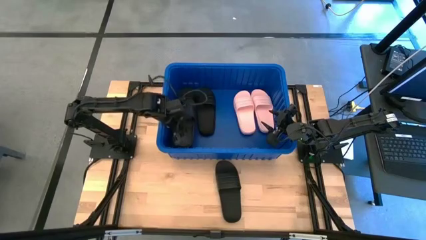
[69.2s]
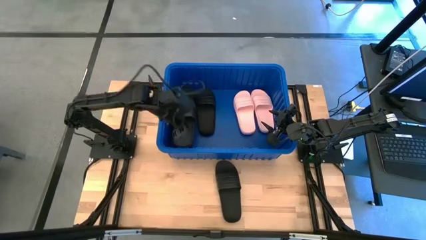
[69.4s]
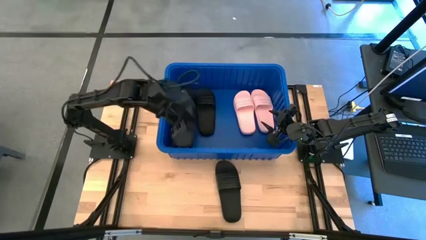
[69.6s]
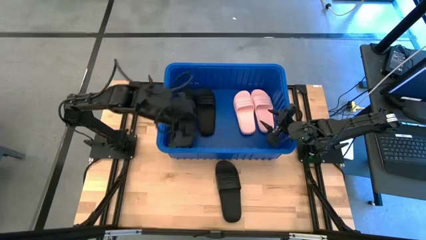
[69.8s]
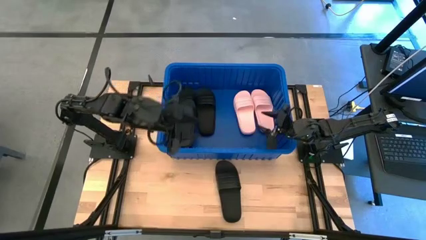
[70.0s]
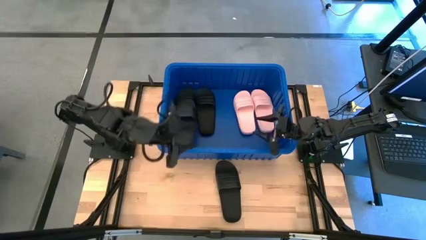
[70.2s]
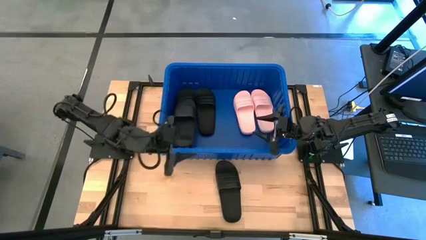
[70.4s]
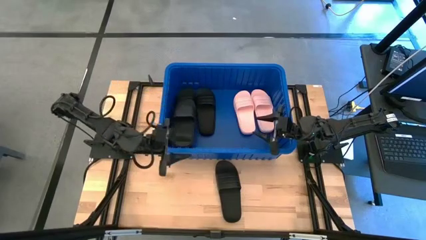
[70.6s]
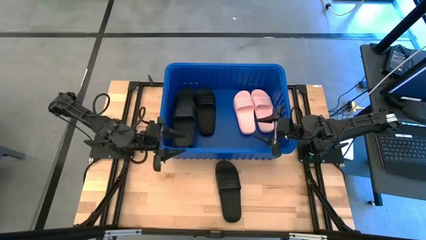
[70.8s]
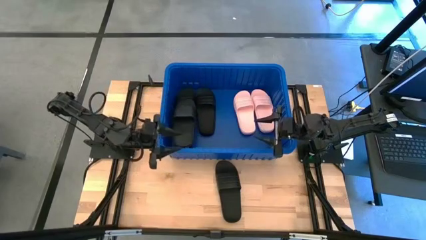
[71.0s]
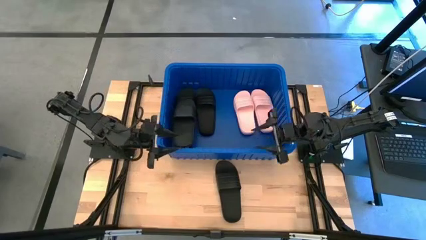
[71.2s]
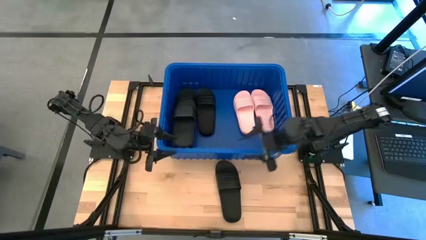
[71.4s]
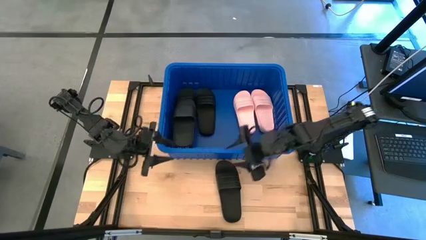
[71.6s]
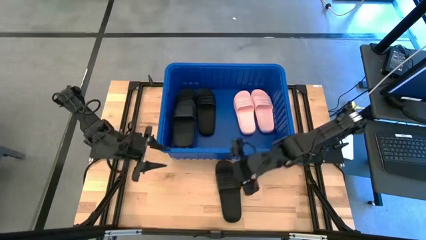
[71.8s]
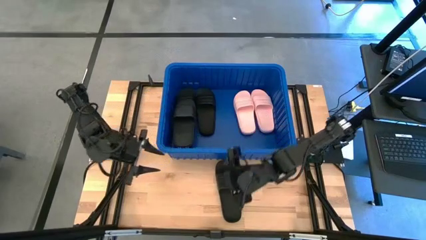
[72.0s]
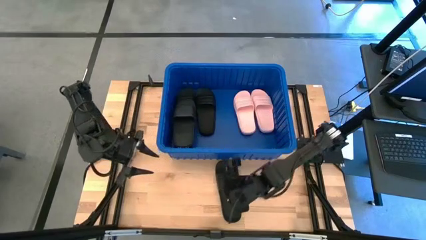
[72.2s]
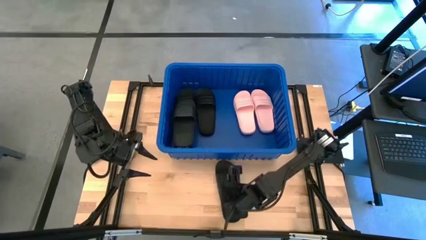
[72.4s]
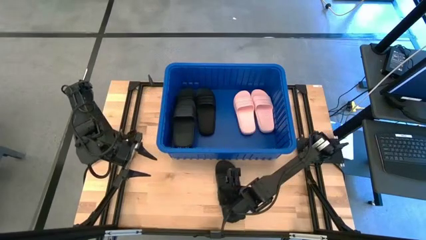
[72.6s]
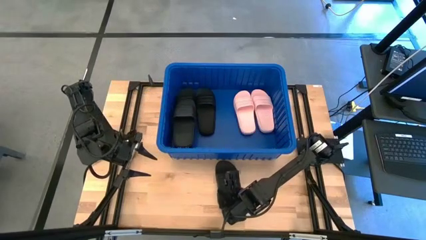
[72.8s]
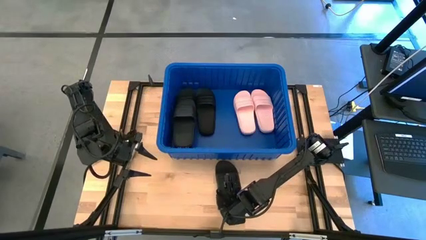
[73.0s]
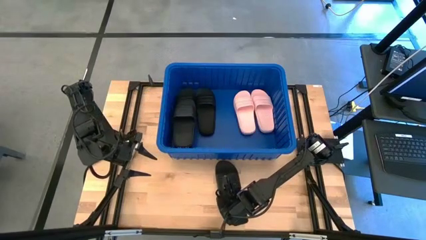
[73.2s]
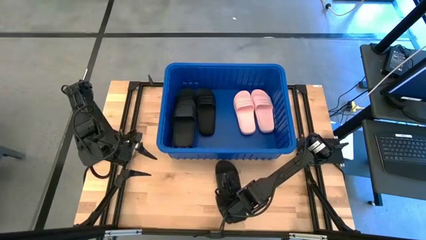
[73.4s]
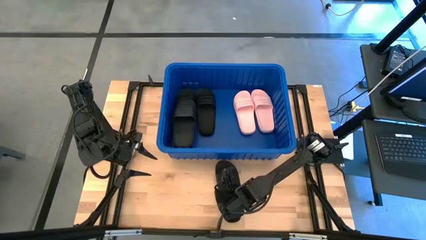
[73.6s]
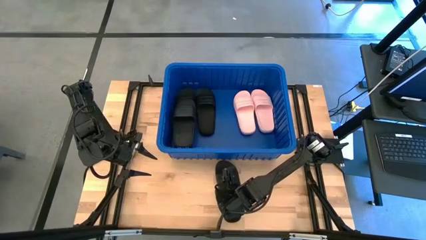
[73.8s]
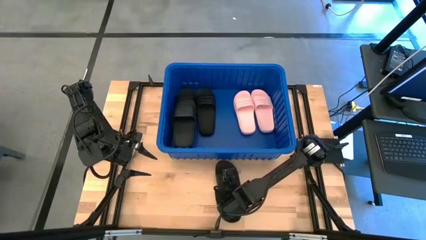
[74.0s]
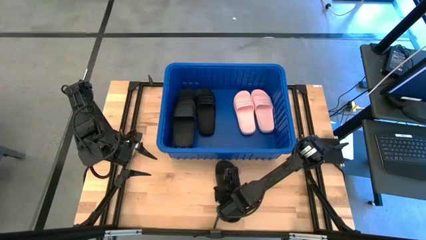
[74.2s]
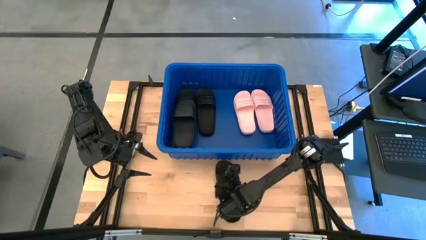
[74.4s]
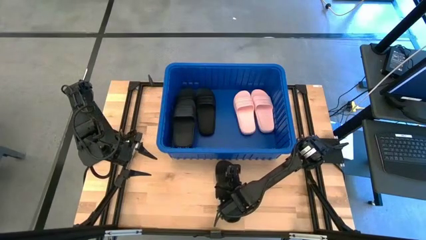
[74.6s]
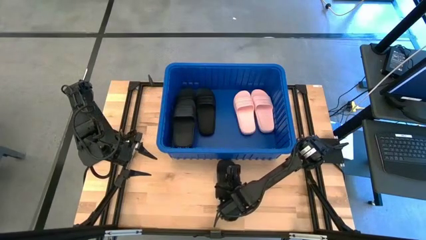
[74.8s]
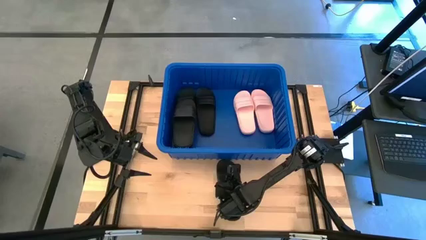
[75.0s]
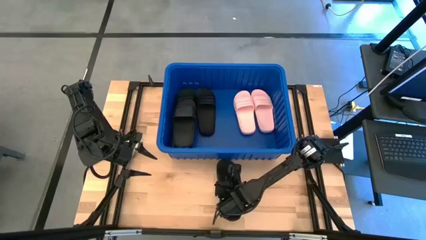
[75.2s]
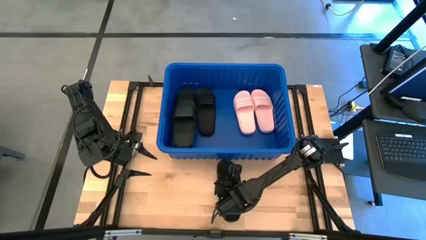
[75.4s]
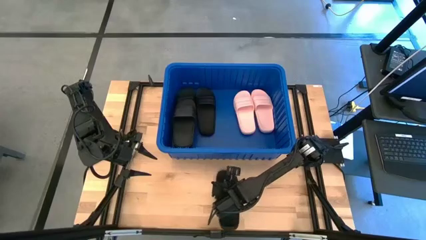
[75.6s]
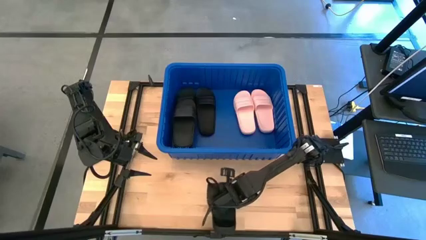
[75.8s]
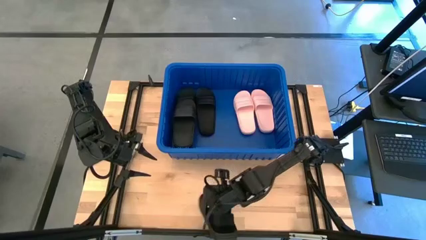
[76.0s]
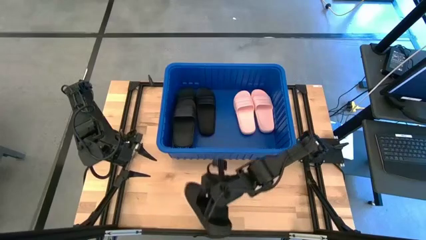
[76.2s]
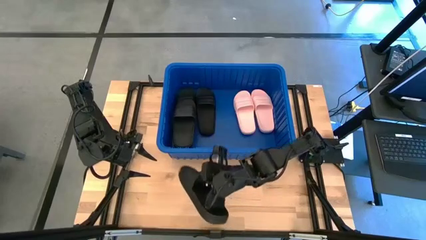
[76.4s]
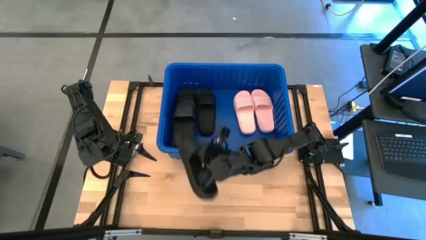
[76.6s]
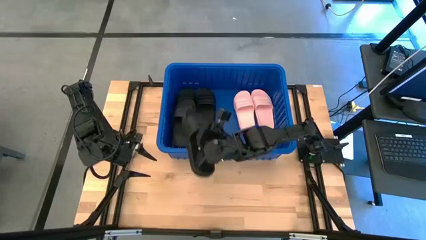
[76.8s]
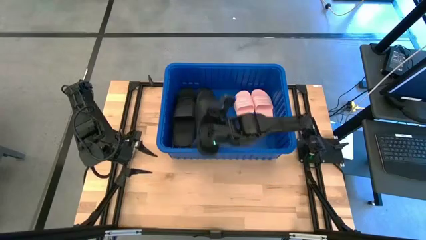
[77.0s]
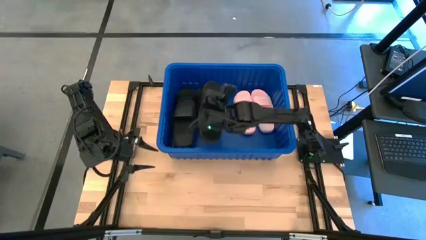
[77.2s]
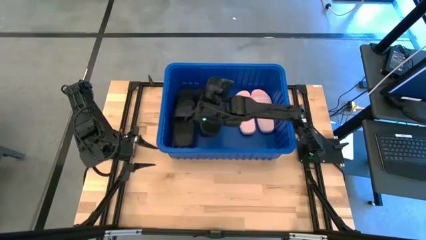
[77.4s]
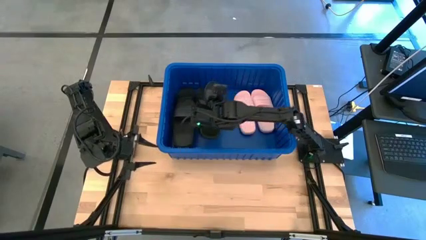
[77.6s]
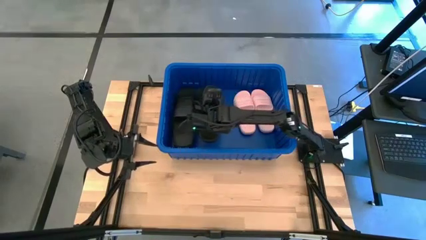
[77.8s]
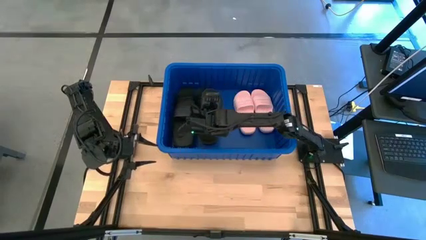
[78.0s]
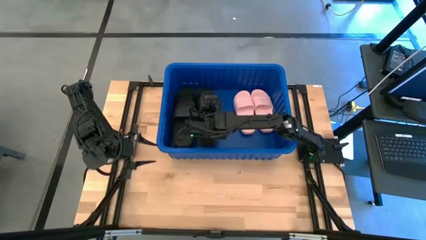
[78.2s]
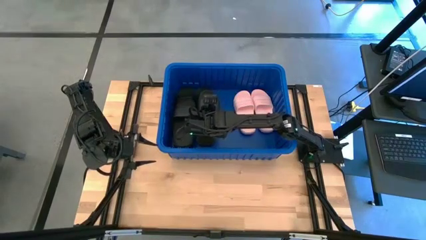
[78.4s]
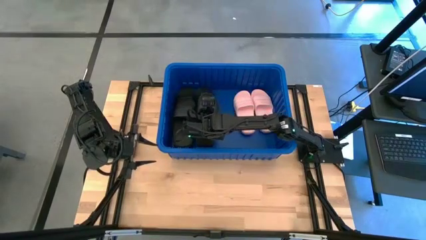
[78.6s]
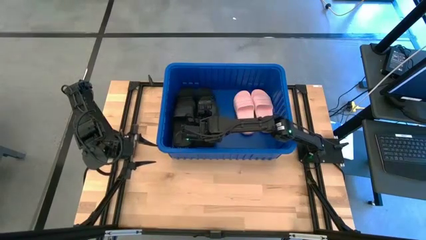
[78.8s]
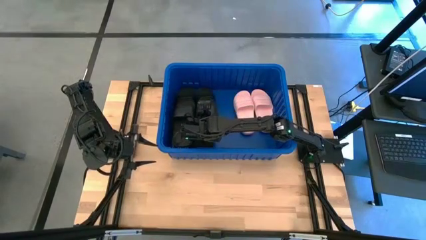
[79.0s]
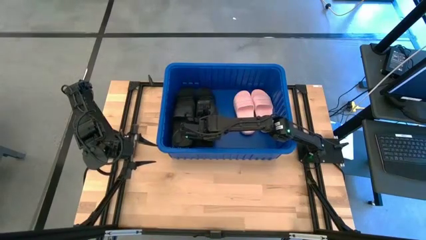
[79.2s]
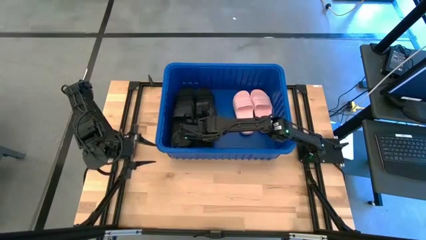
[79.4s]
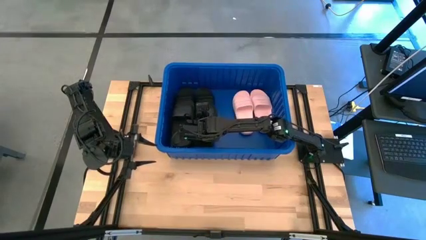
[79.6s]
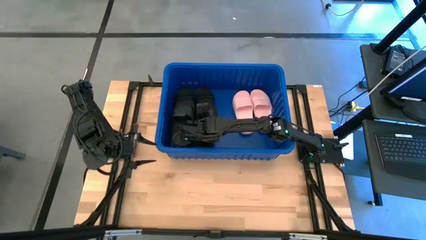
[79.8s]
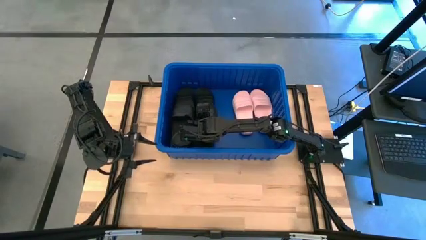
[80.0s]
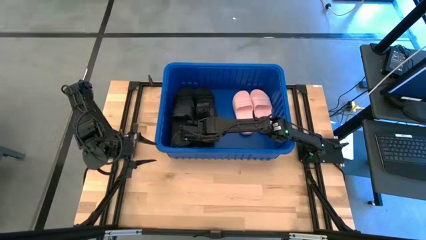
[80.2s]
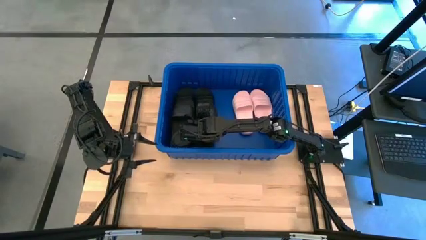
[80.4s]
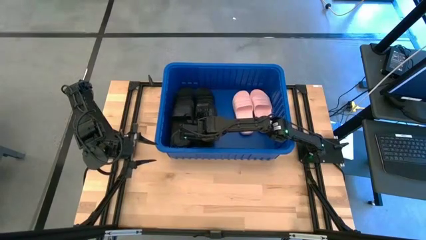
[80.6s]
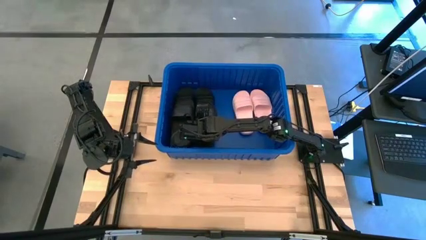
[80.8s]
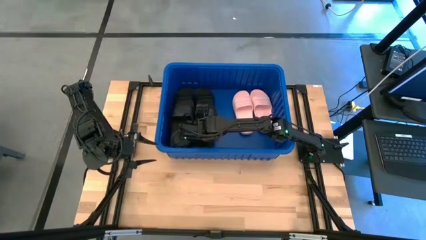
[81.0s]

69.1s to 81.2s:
Task: Pick and place slides into bin
Put the black slipper into the blue bin

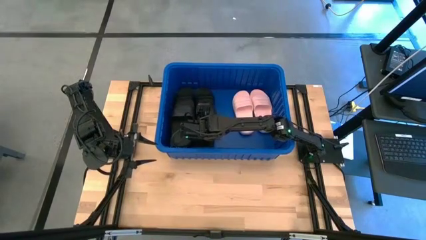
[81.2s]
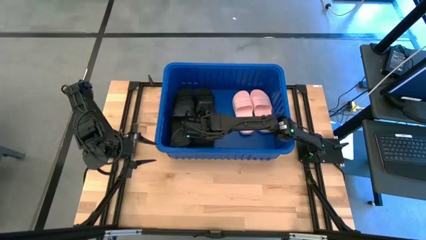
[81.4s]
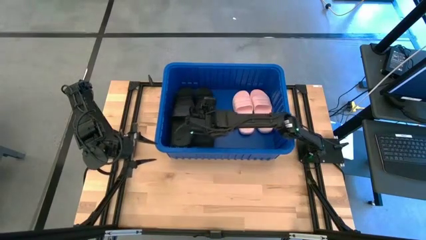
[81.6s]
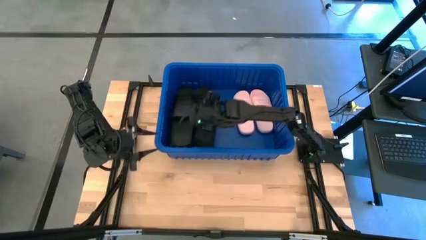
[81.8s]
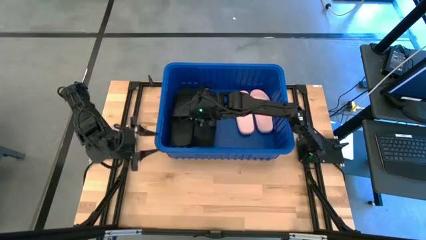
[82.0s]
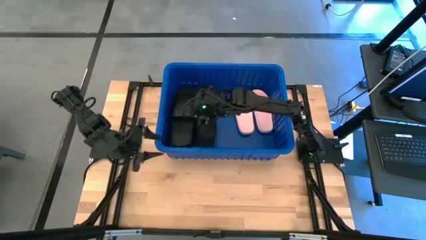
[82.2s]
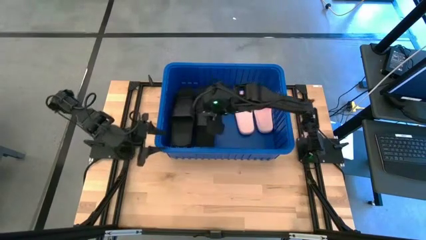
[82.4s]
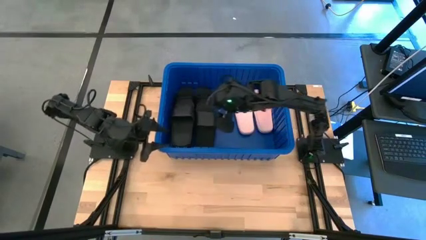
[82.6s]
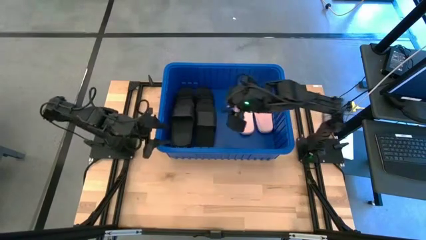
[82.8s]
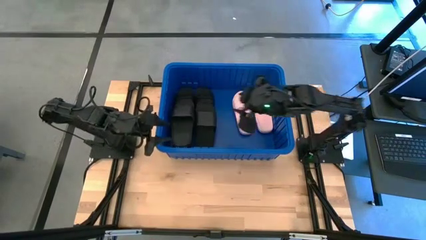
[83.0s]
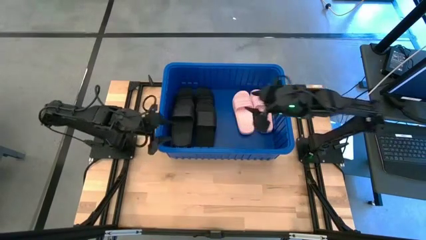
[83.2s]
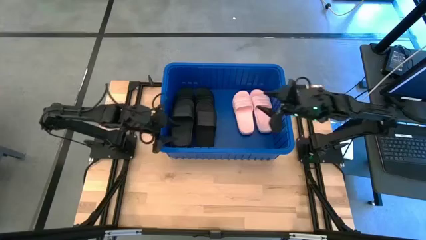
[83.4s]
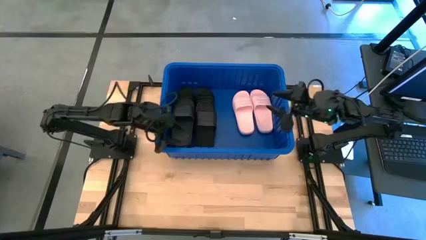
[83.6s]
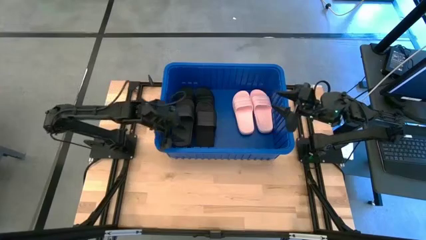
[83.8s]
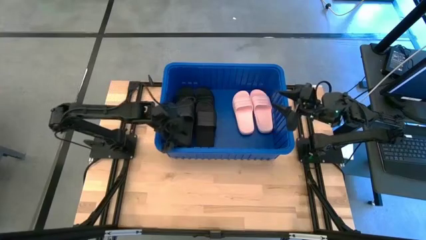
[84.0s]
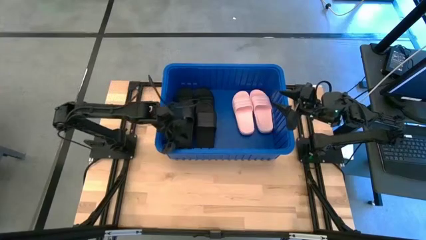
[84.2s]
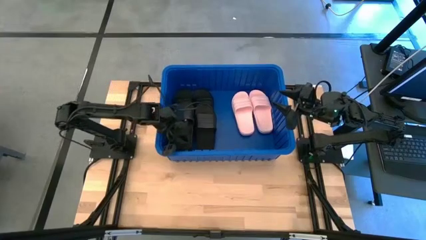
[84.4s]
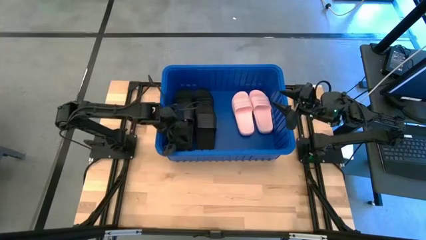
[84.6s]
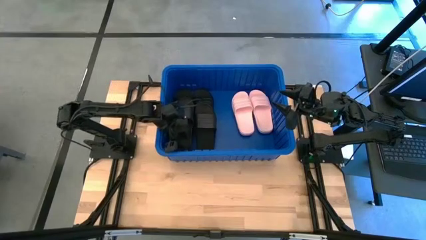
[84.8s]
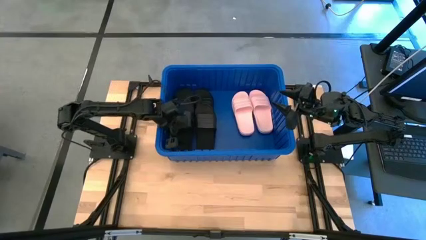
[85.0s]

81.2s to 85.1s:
Adjust the black slipper
